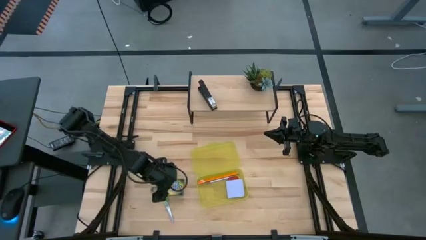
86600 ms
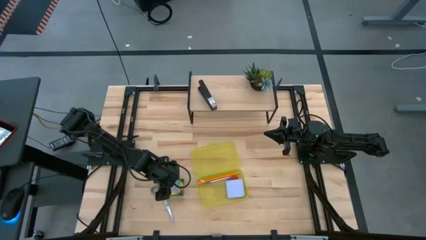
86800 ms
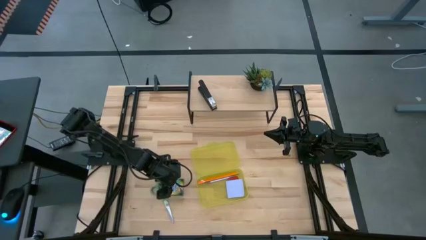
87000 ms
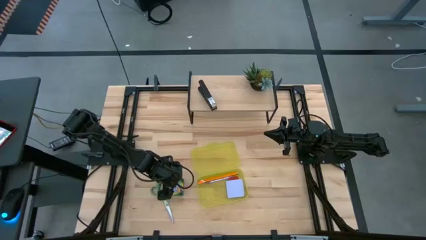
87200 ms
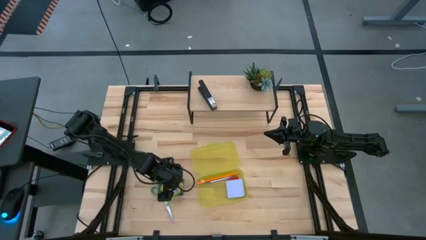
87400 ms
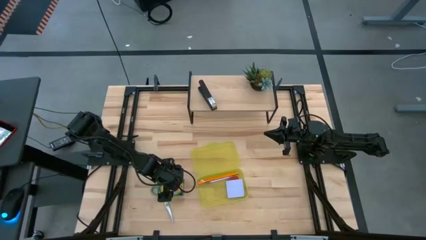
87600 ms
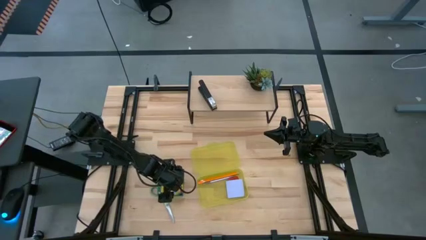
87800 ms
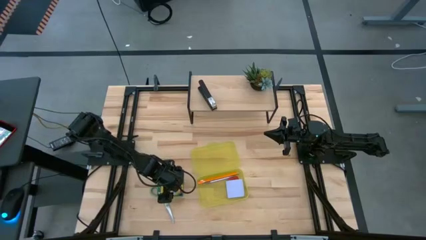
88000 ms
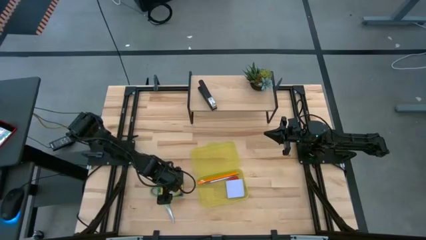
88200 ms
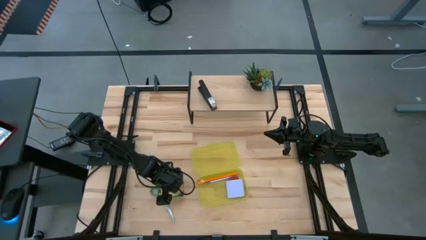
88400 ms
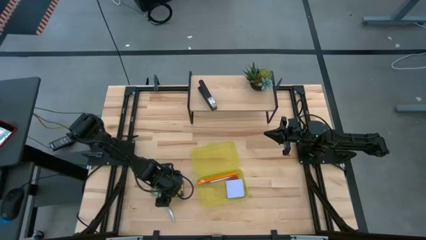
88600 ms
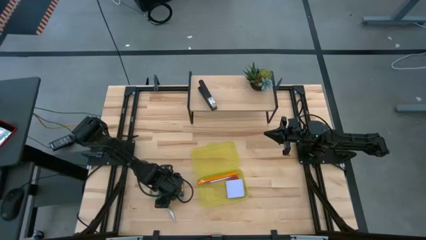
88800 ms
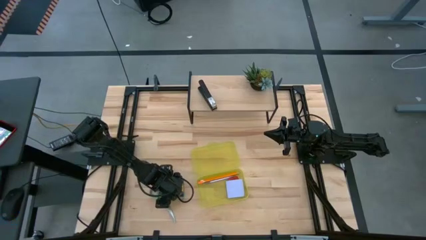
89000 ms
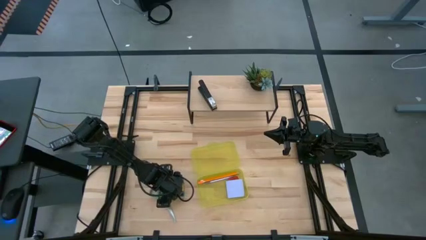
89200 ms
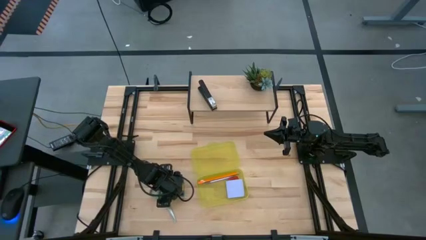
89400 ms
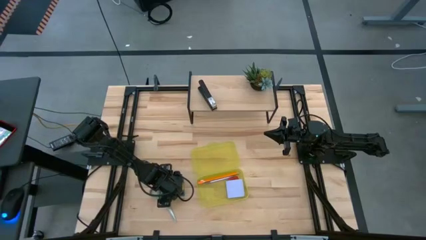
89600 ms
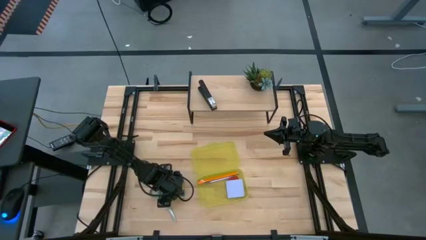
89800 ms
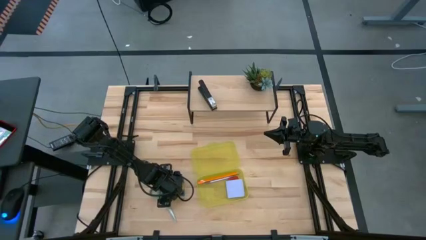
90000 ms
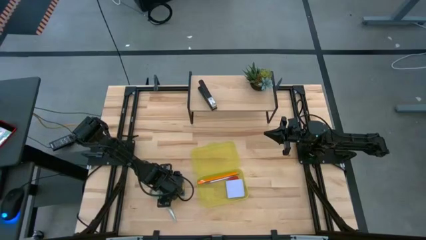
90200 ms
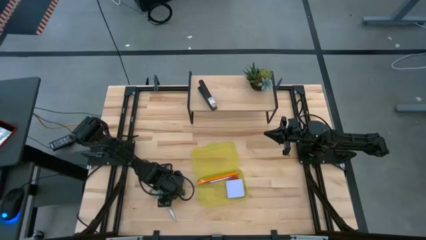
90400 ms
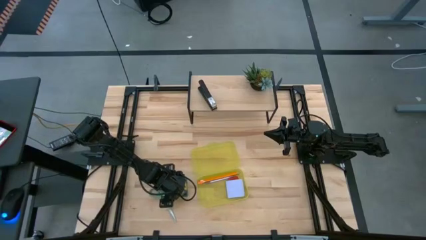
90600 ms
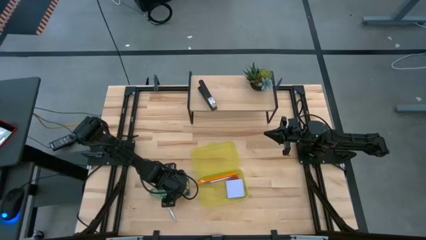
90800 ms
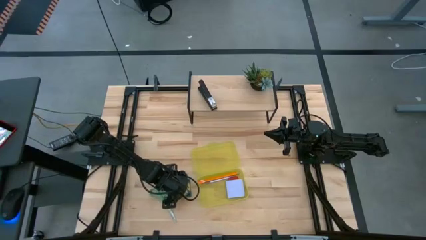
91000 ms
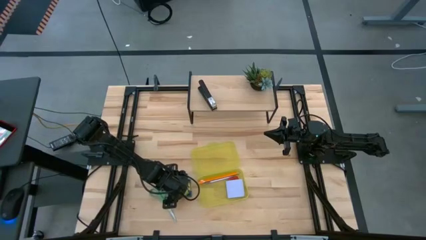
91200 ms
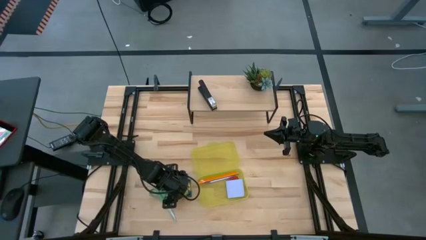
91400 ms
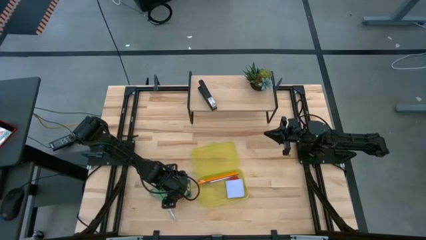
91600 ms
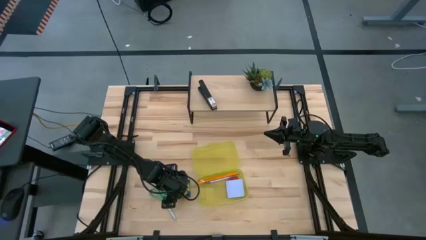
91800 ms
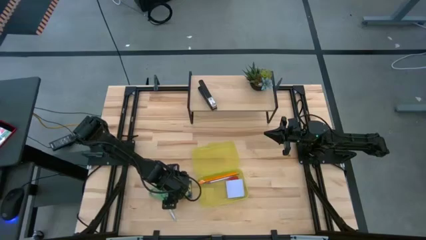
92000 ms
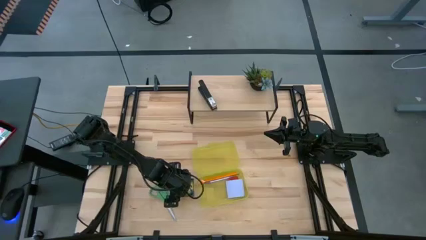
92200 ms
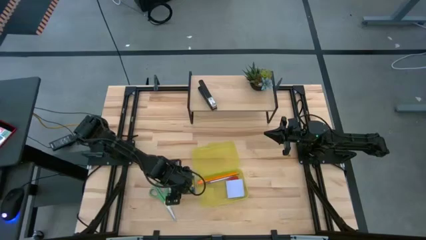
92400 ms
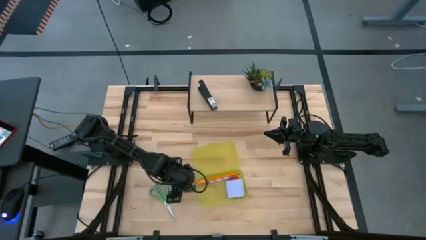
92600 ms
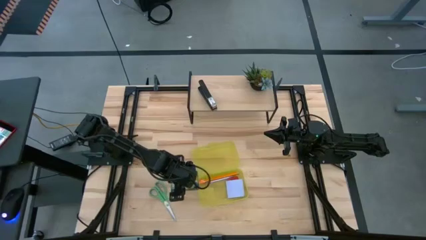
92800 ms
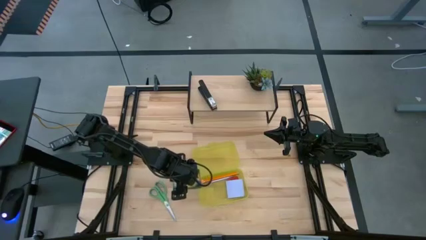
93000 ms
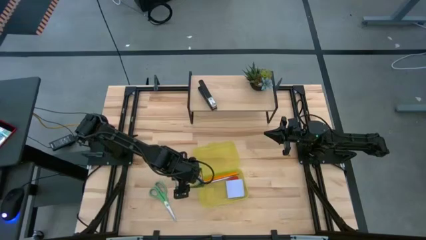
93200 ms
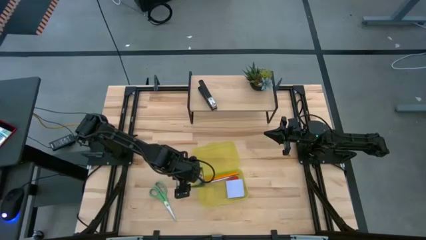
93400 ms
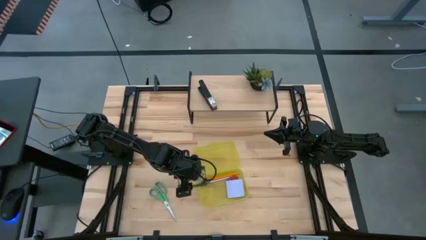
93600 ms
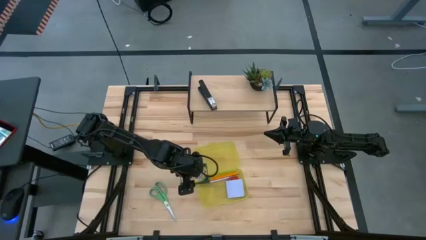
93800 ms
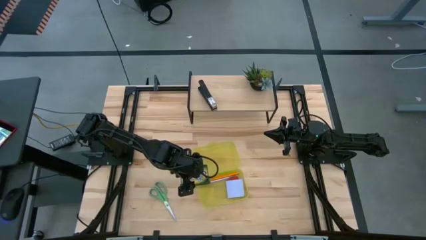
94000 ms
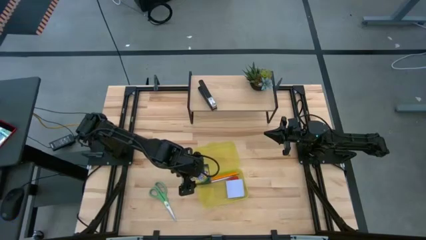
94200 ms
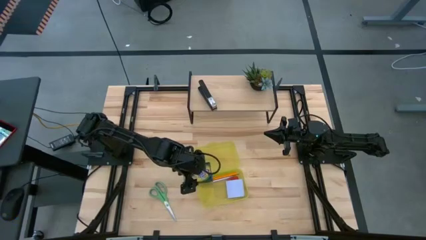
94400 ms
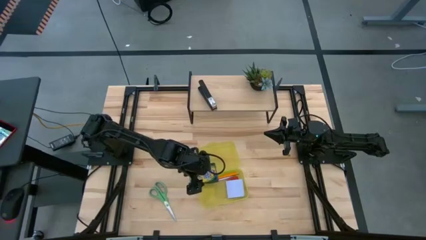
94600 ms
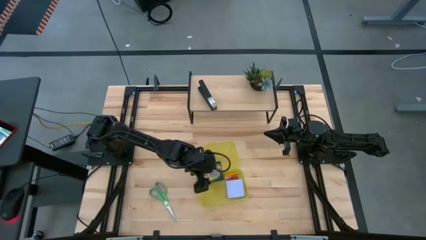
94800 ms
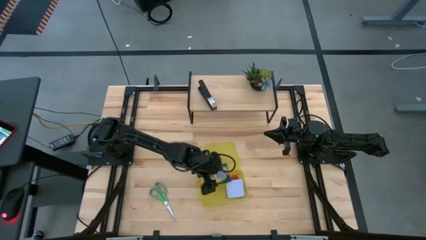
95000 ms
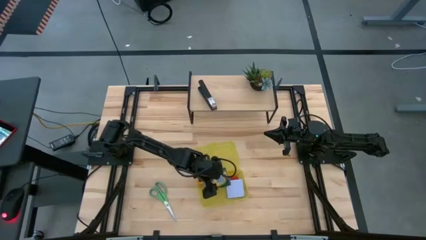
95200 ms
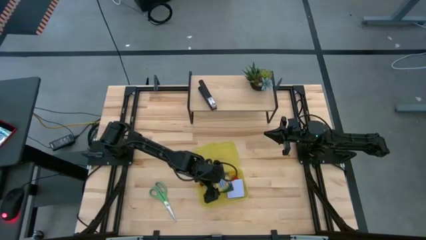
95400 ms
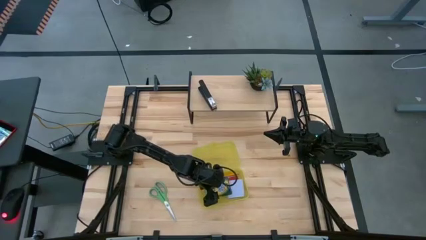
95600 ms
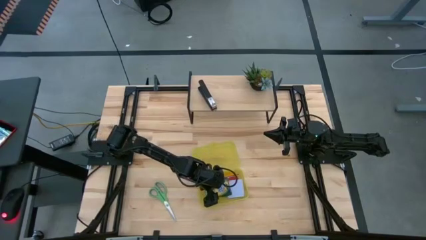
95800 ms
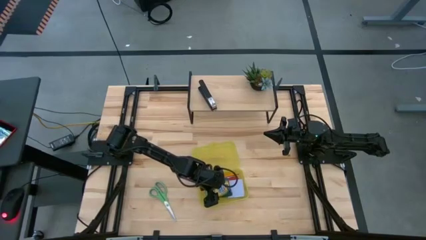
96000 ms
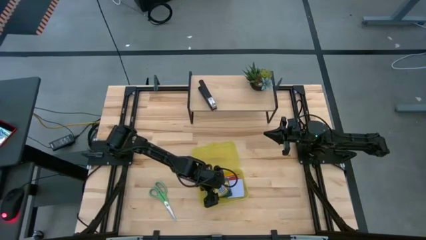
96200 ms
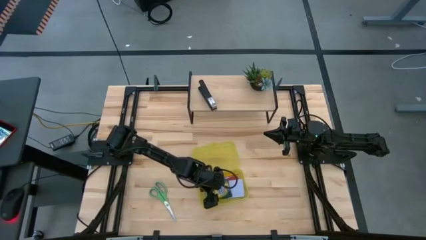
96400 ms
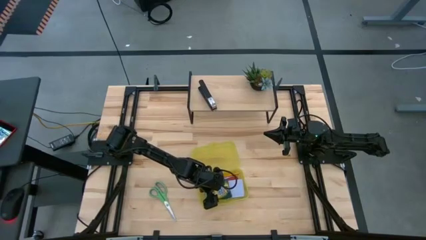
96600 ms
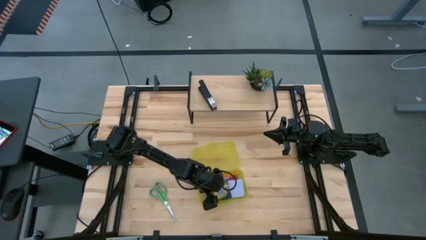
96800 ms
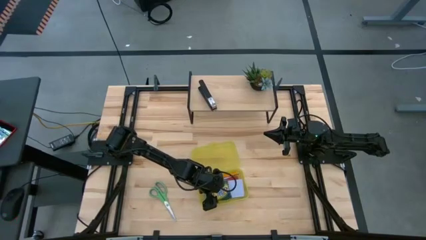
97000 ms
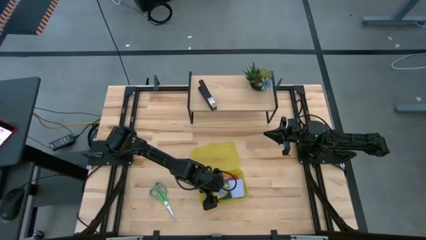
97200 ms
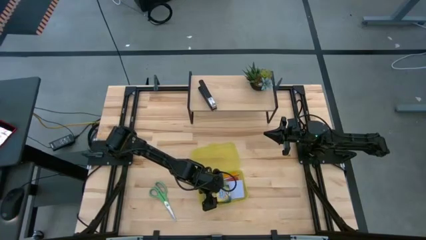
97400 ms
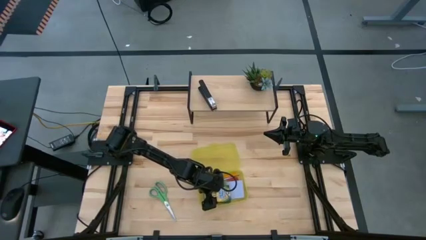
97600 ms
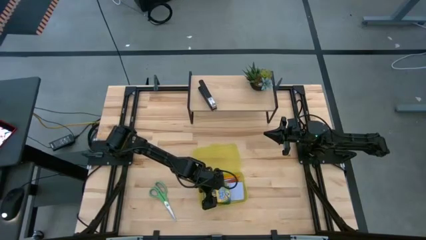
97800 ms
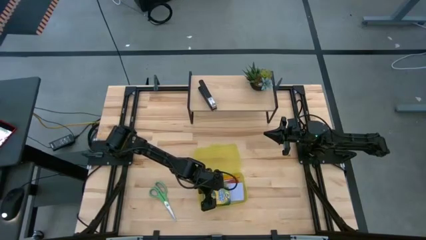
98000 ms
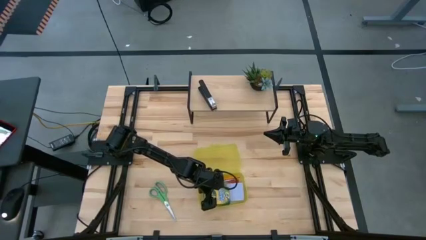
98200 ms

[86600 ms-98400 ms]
Task: Pack school essentials
Put the yellow crayon box into the yellow supply box
